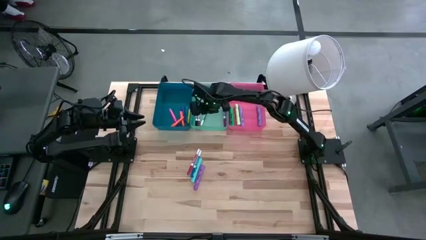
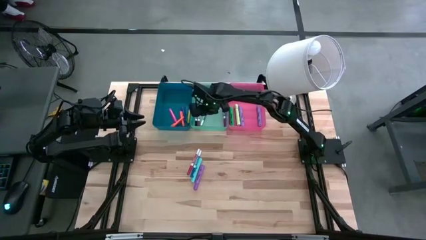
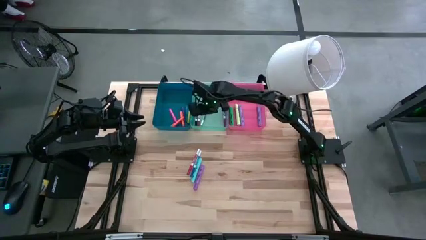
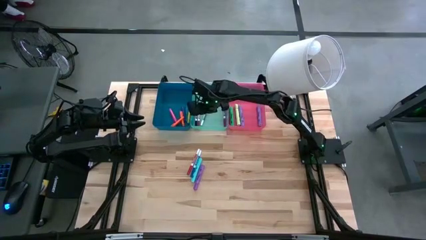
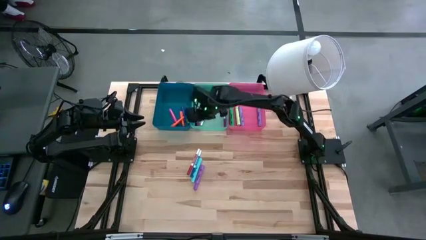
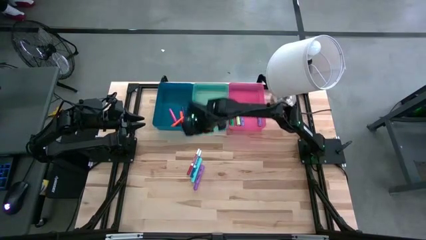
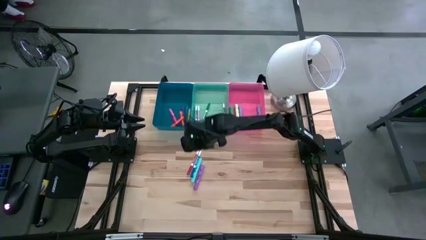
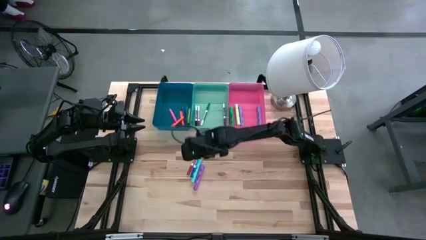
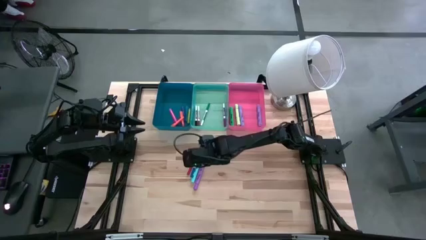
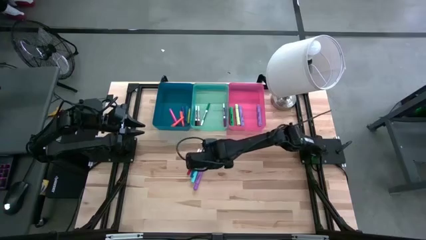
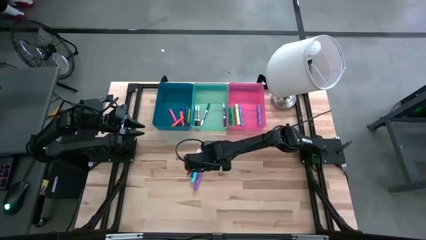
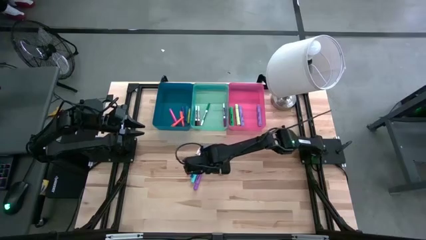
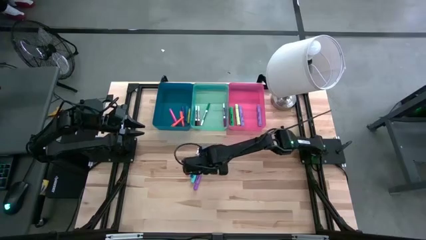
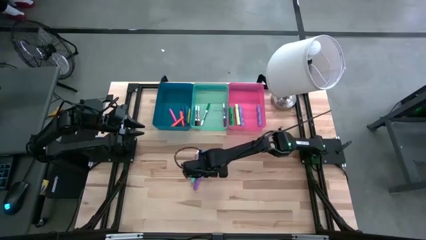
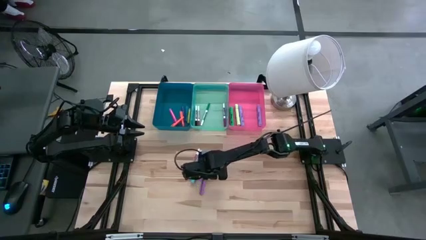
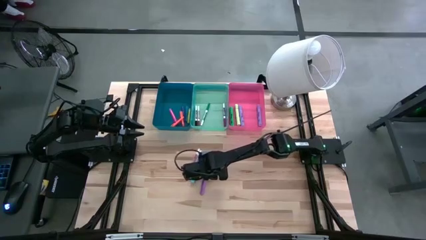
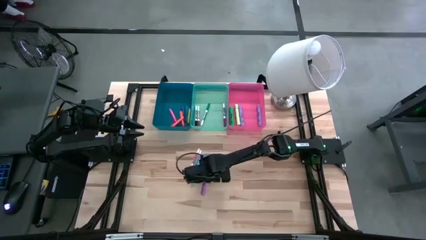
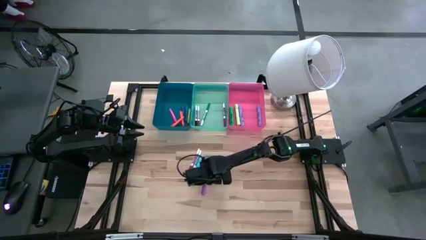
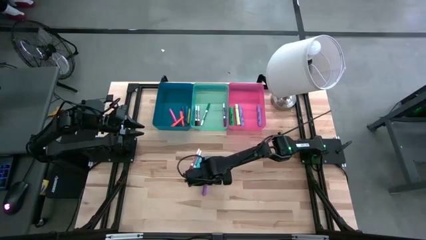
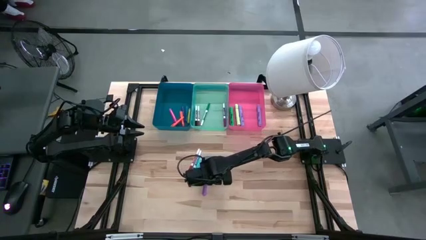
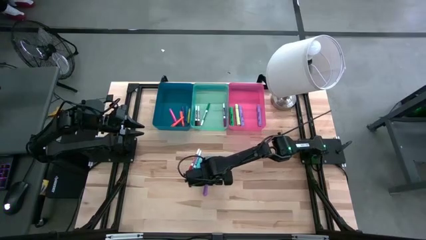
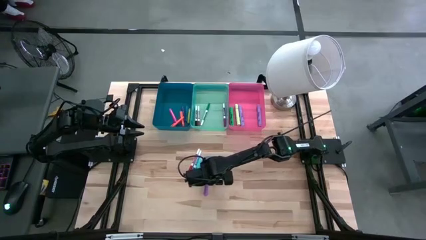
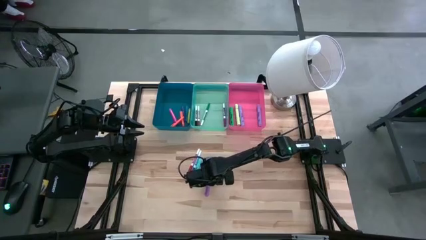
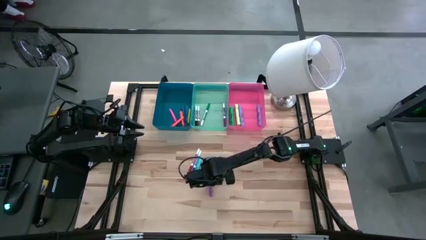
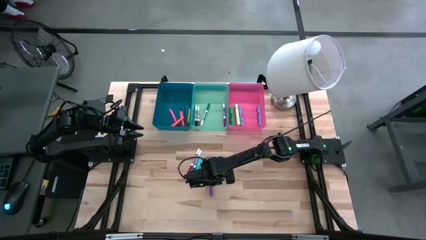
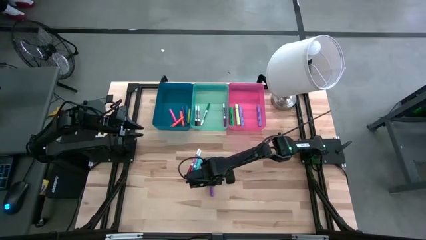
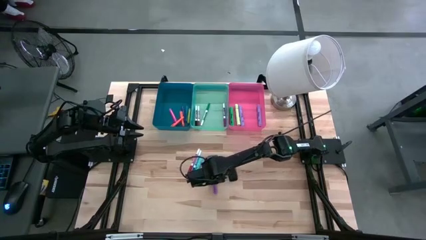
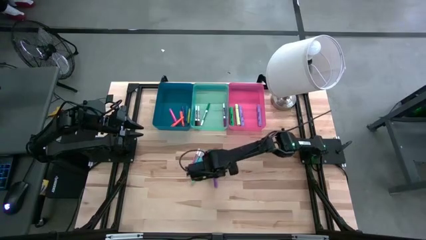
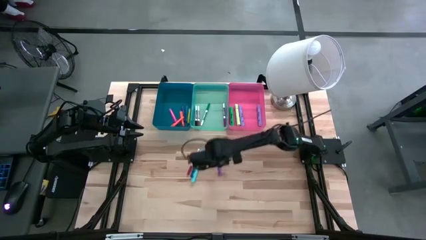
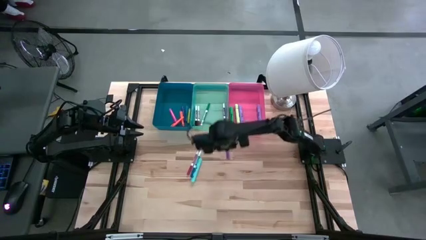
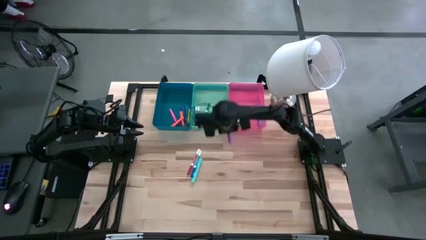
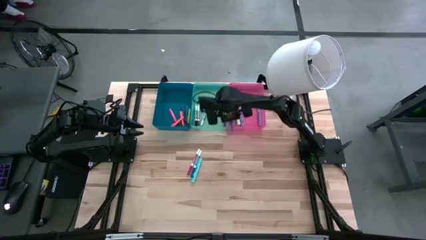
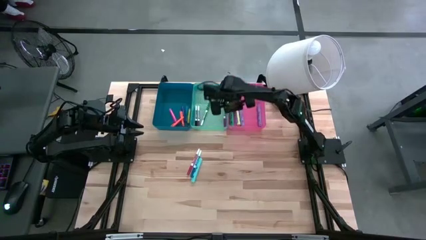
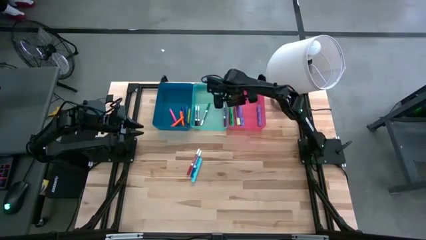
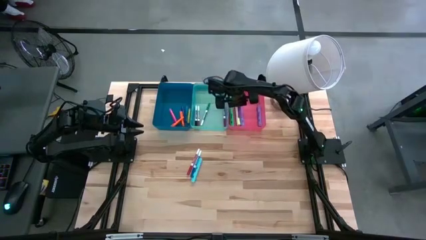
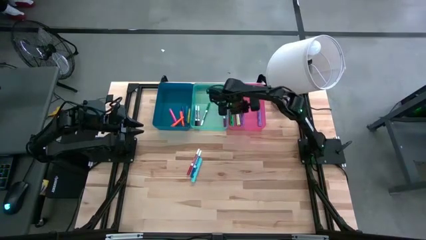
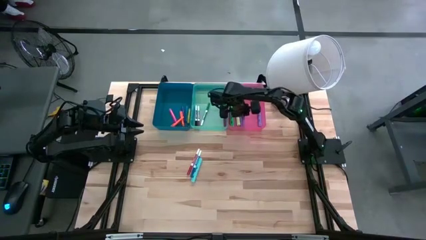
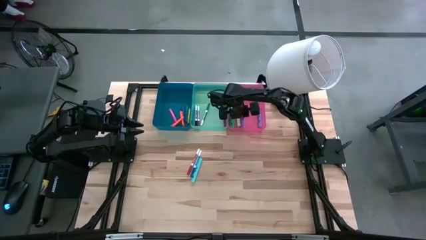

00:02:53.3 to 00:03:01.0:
Task: Pick & Place Markers
Put the purple highlighter pen into the pink bin

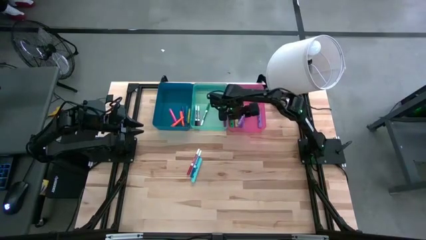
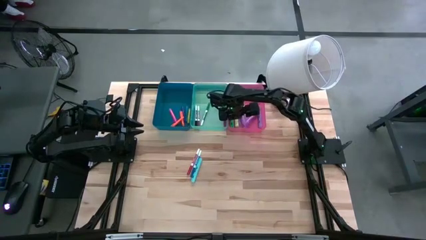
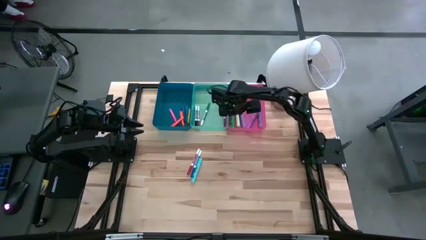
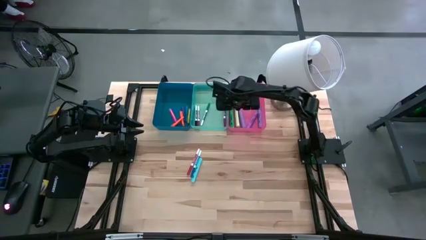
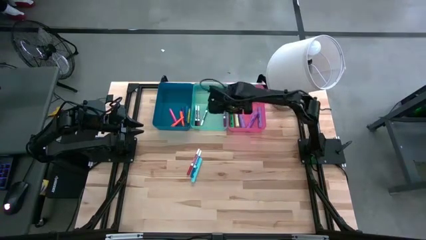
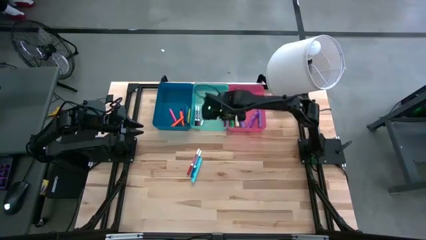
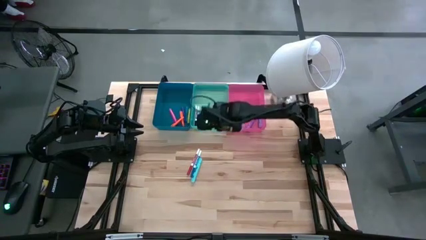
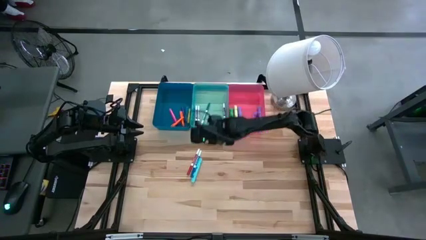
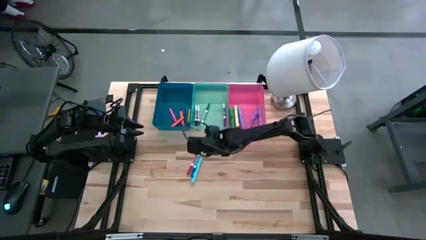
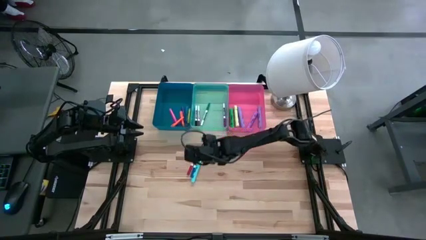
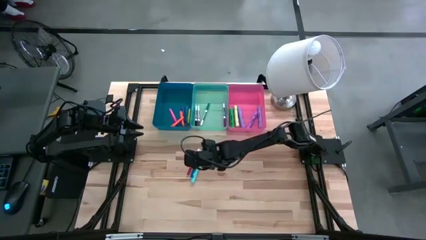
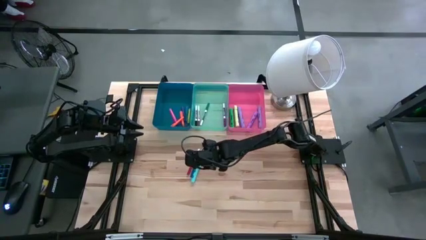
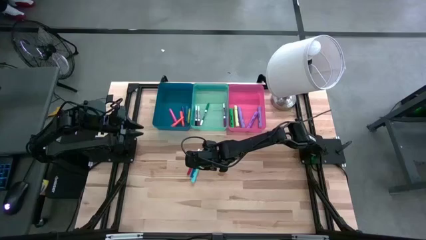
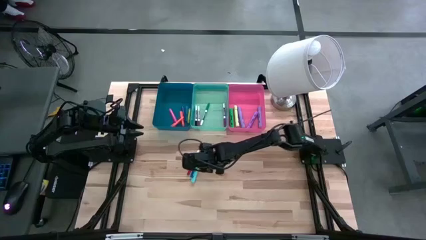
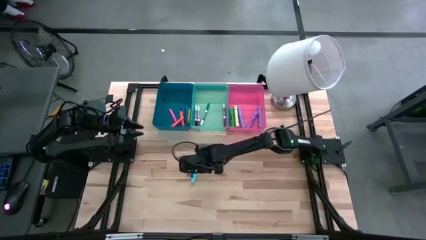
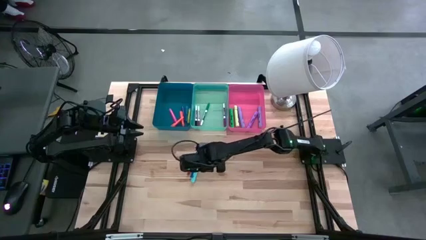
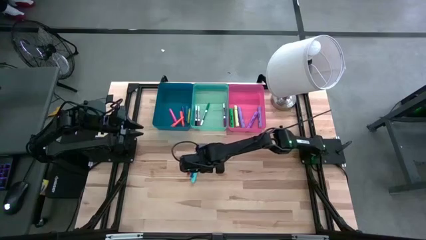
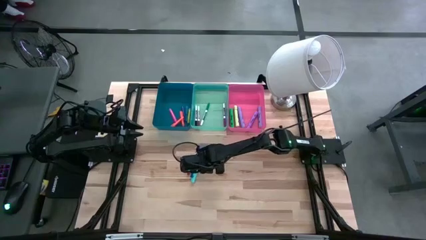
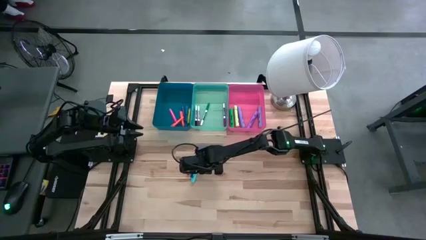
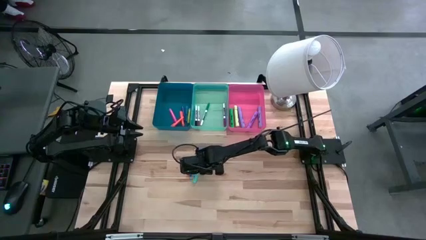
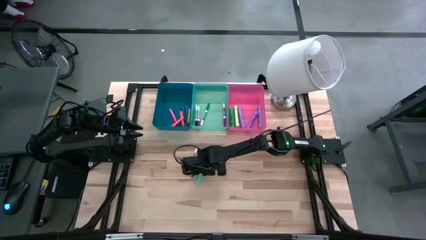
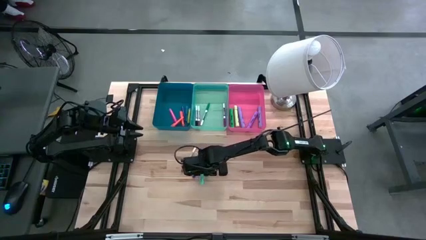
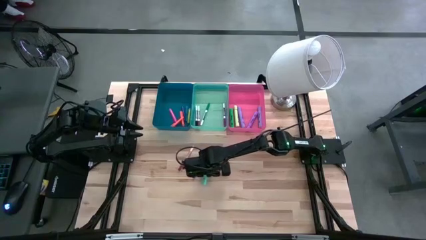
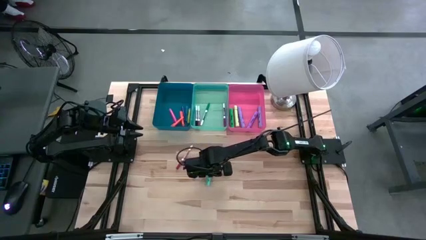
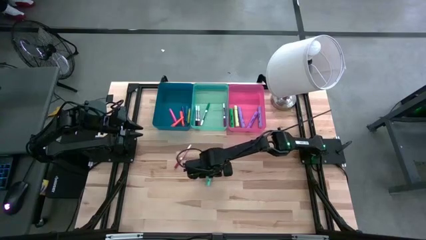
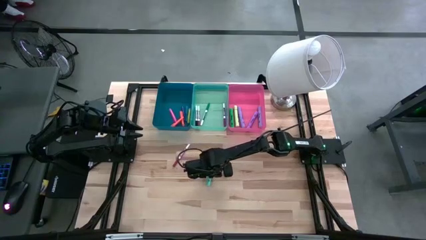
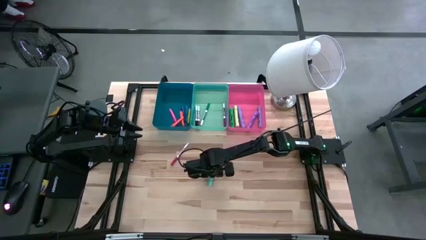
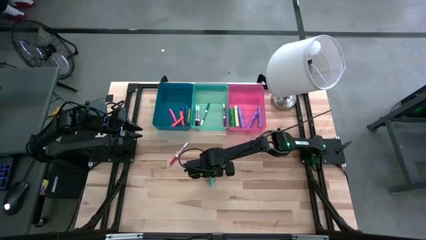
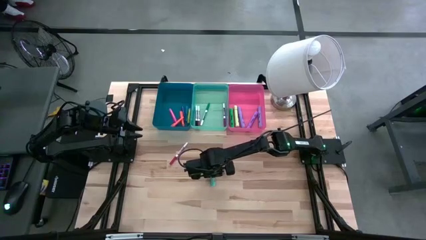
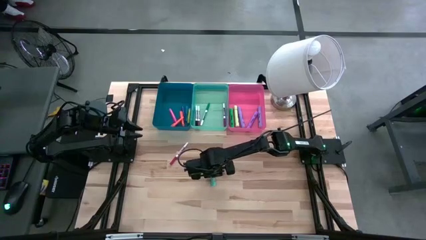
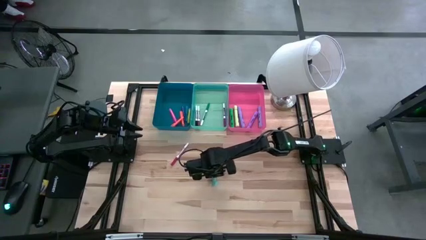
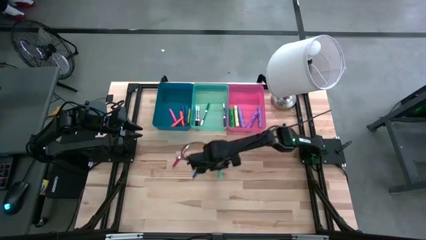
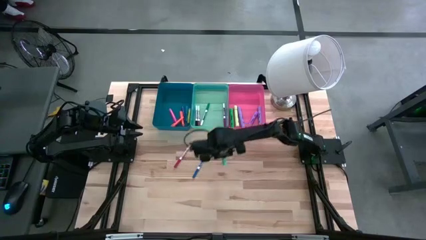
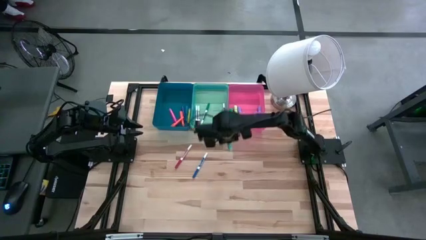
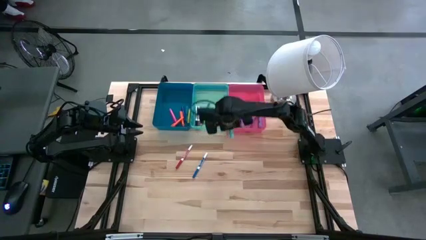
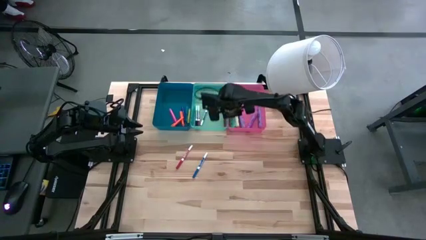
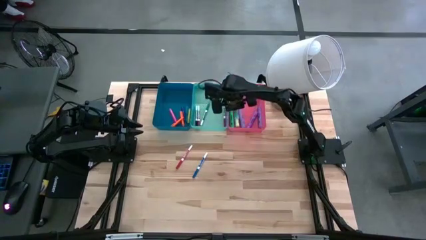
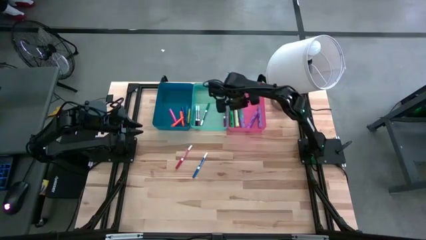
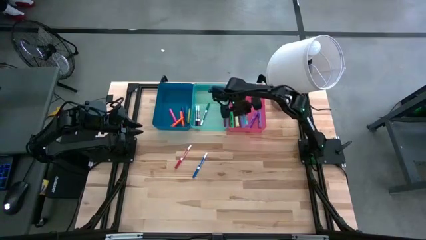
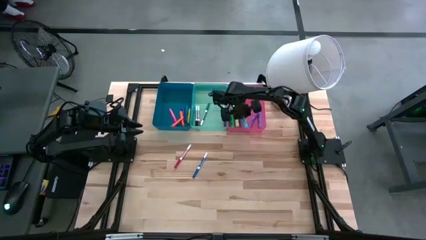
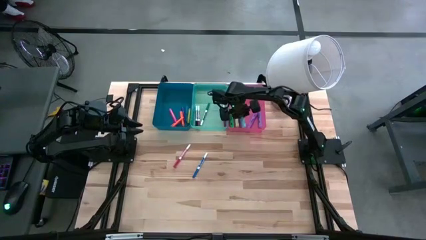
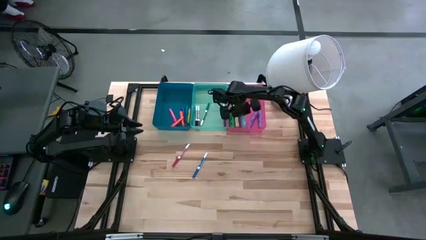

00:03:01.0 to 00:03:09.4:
Put the blue highlighter pen into the pink bin

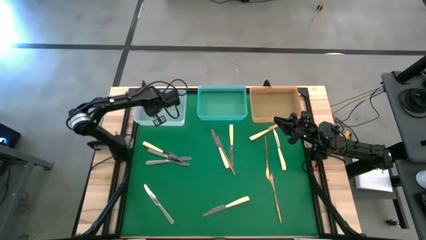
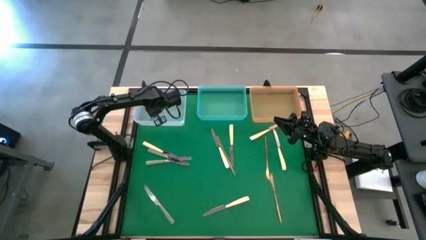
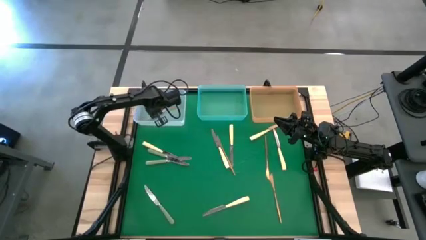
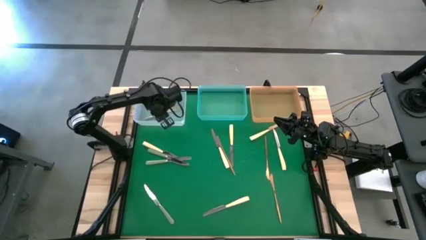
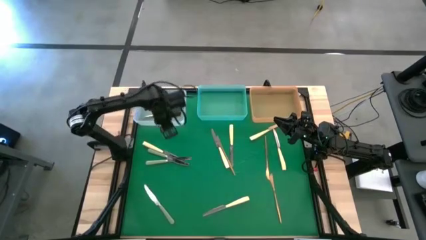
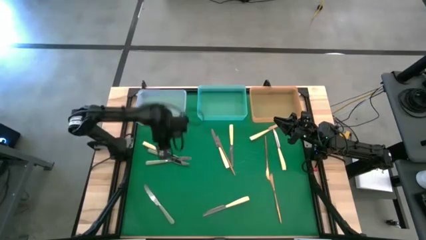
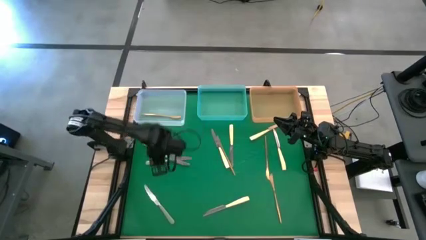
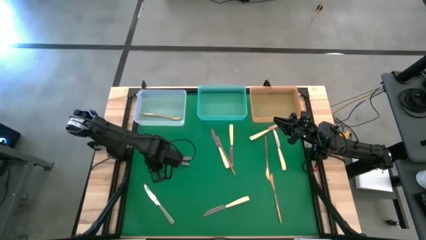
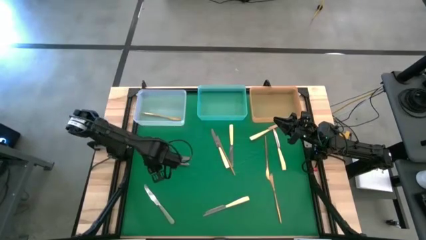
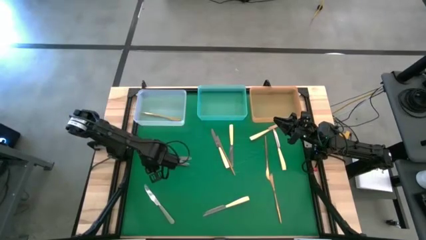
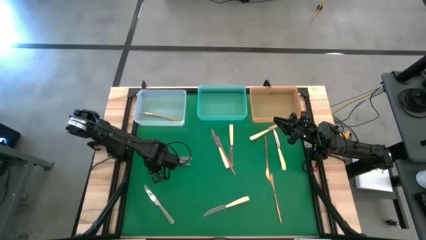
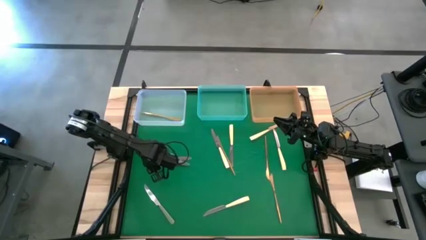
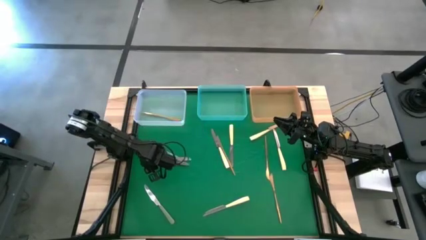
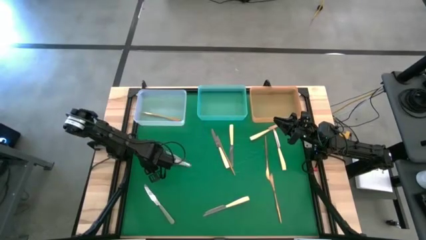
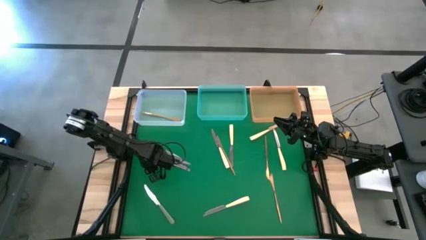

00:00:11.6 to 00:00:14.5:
Task: Sort silverware by color (type)
Put the green table knife into the blue bin
